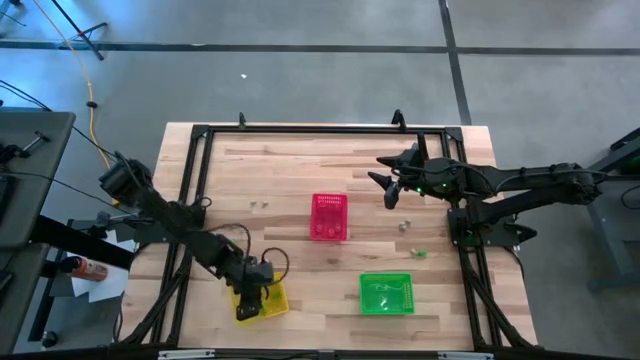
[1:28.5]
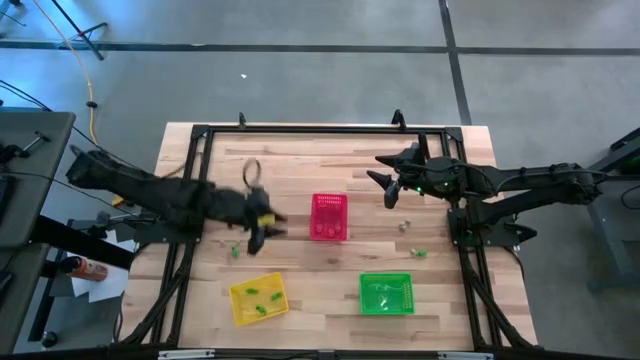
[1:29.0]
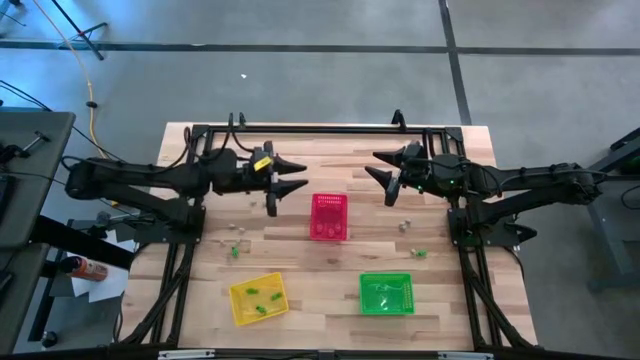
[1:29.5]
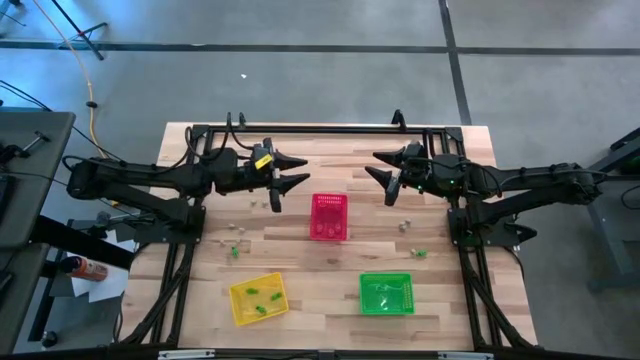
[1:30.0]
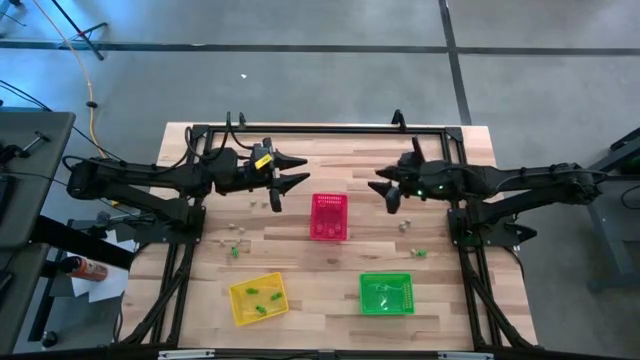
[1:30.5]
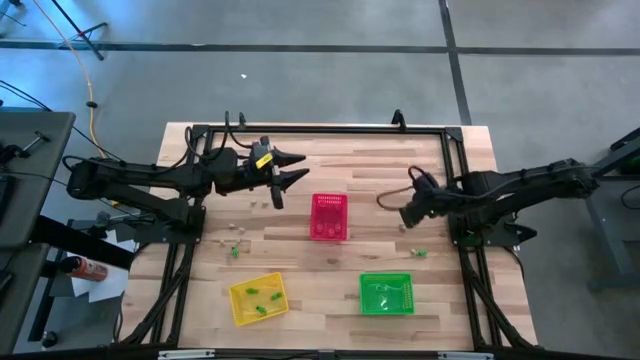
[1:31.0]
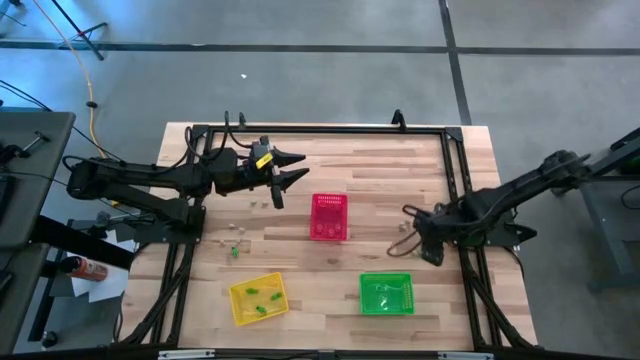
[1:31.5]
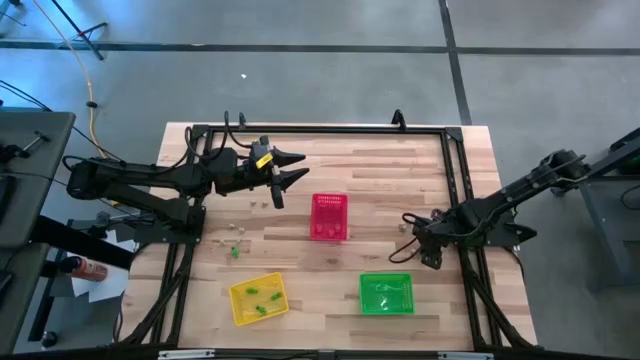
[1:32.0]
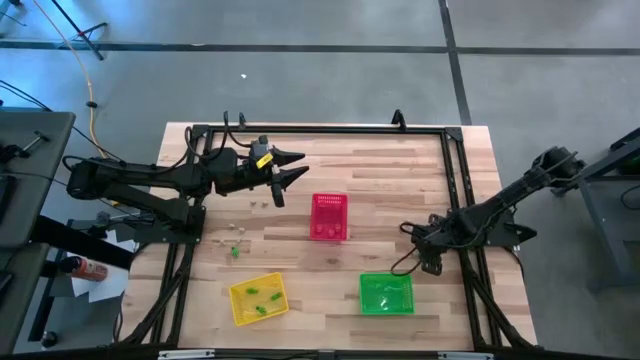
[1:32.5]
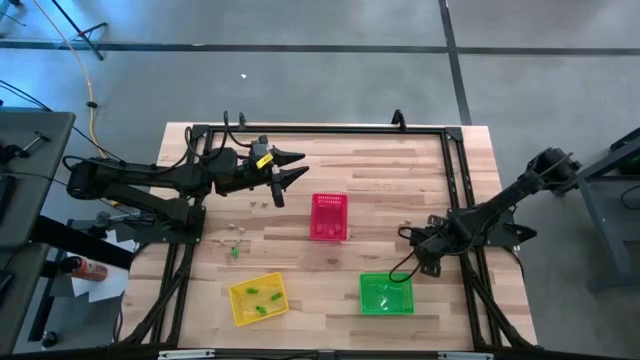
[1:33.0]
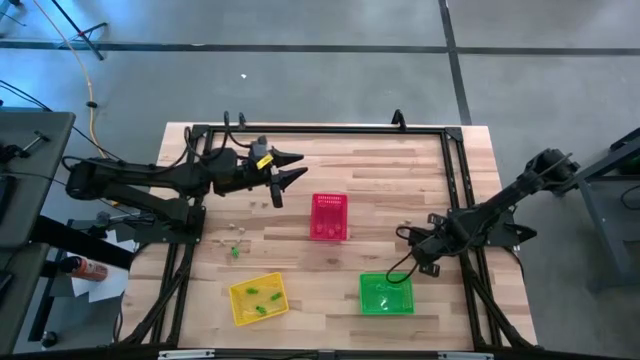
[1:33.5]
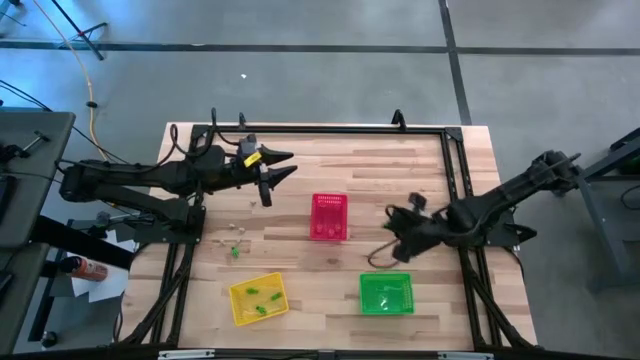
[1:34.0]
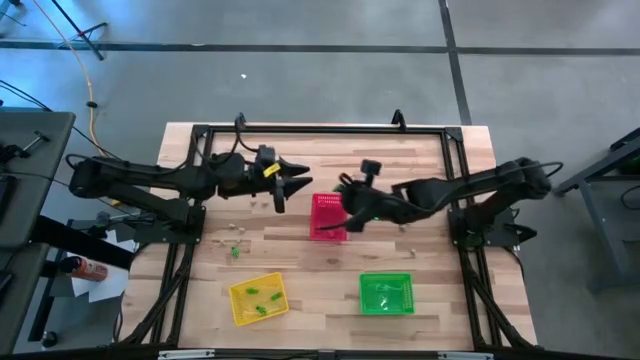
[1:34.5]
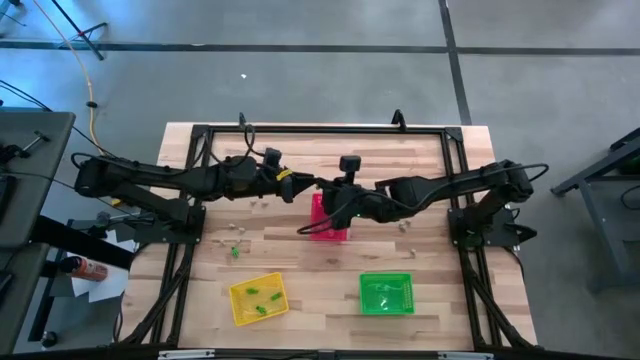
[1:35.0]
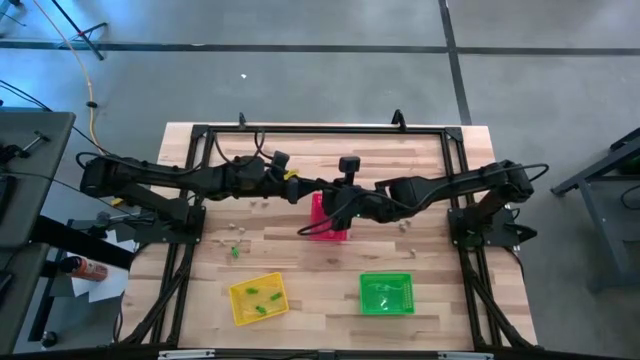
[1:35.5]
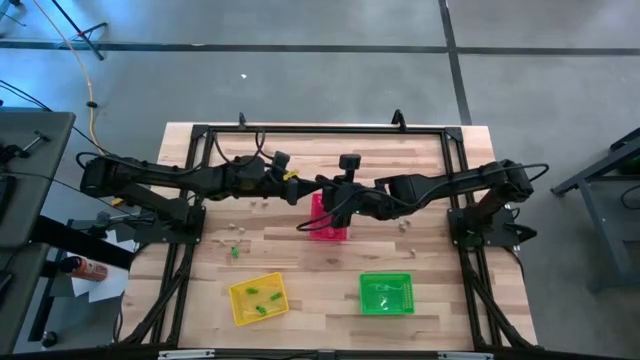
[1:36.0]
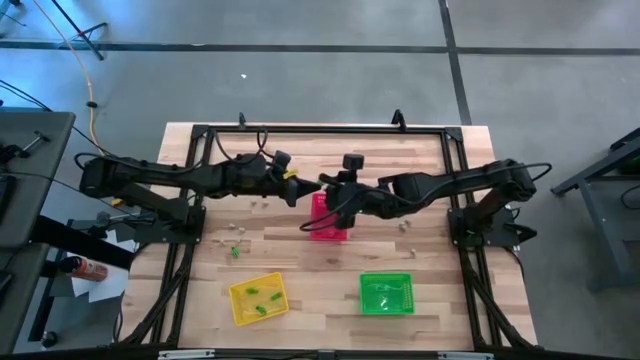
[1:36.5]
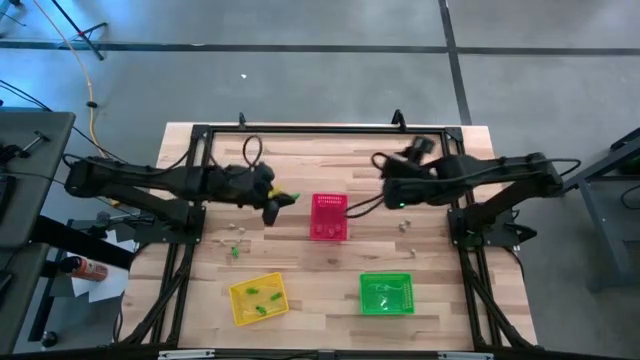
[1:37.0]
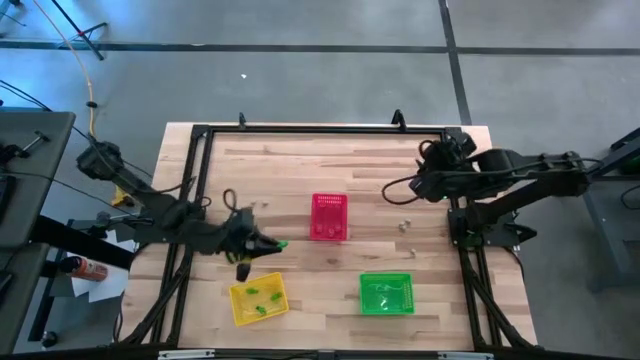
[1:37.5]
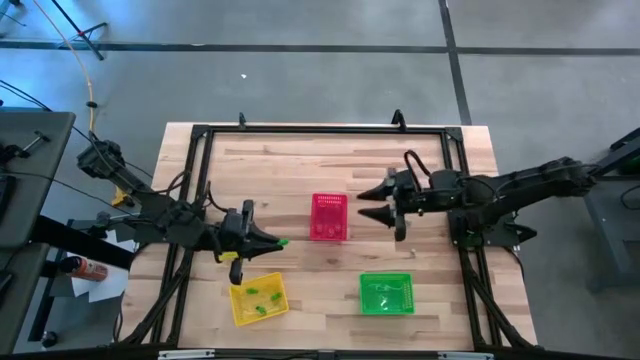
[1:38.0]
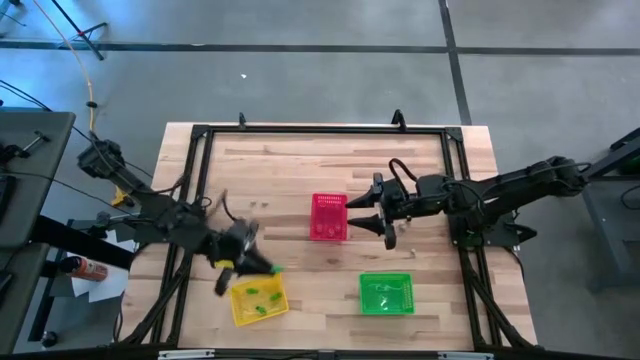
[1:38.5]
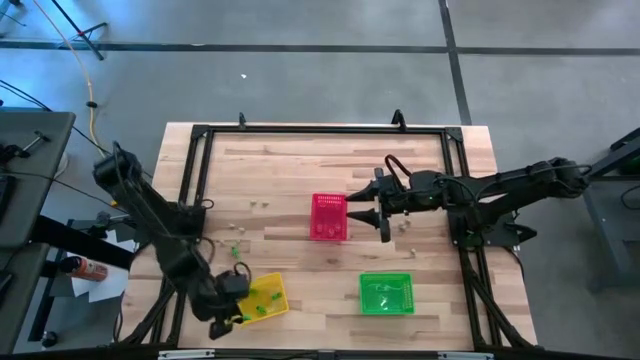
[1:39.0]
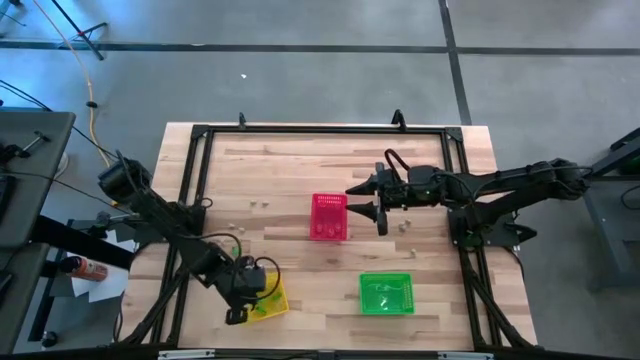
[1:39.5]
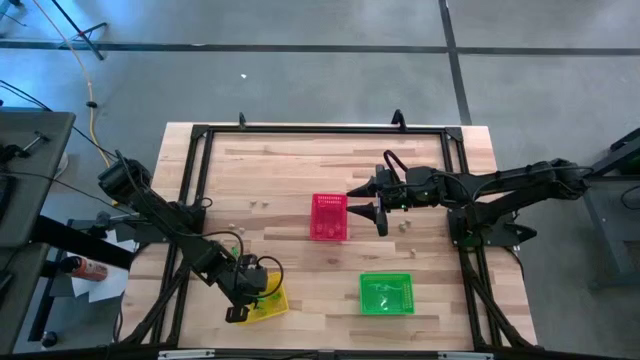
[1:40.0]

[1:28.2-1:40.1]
Task: Sort Halloween decoration
Put the right green skeleton toy into the yellow bin

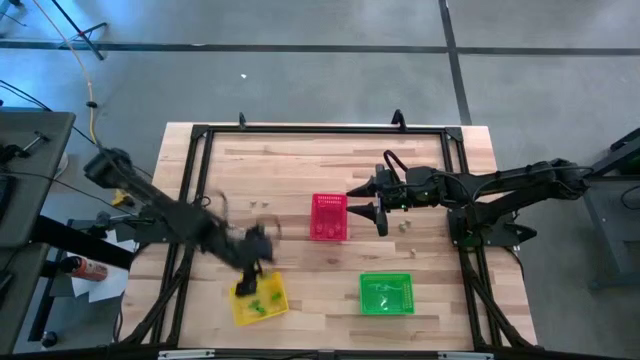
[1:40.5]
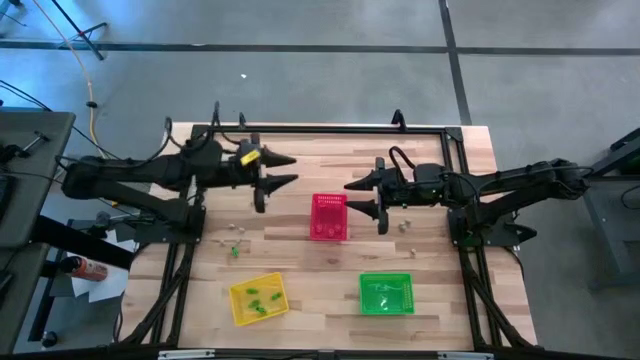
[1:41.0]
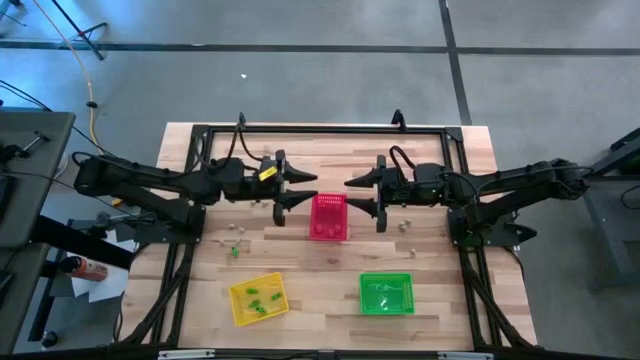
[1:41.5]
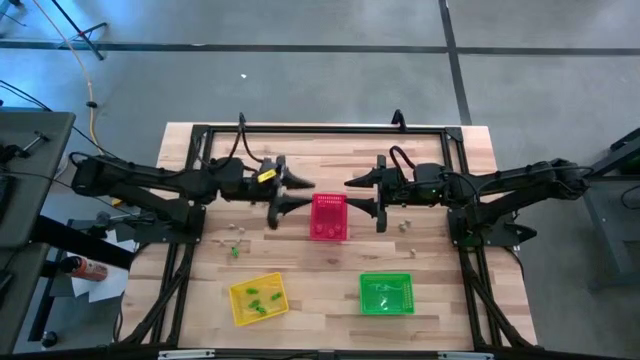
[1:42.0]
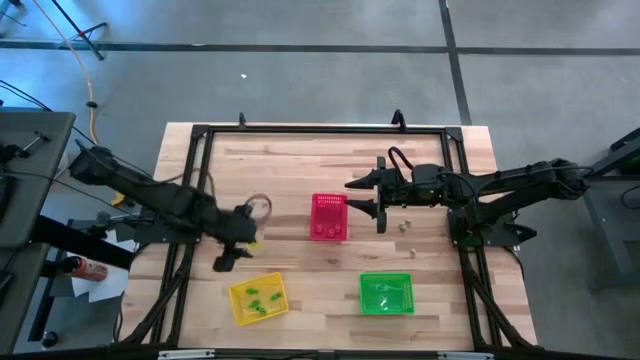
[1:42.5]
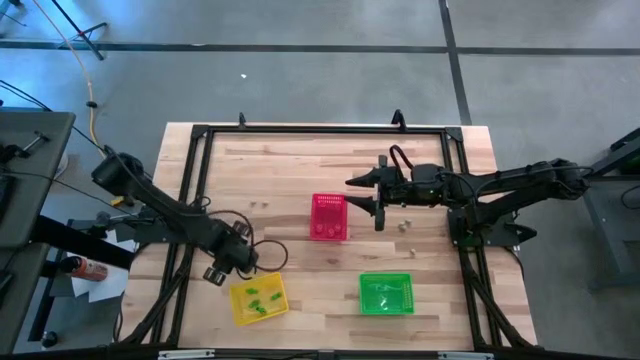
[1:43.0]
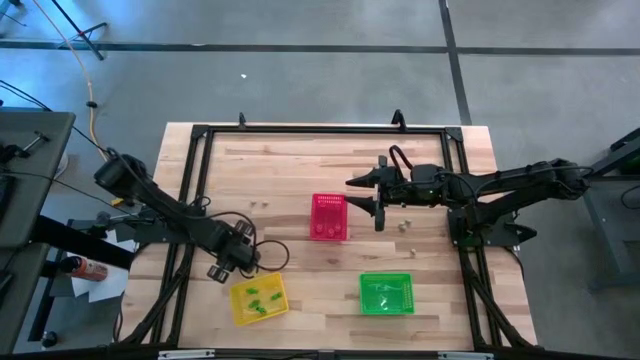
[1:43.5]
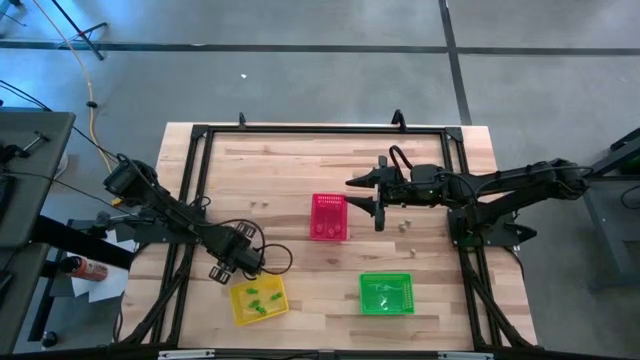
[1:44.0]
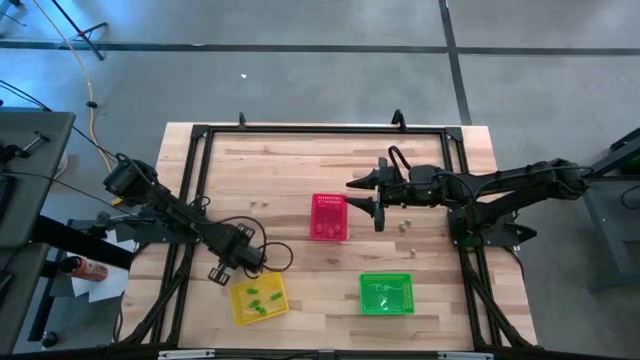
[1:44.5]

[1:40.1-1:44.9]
Put the green skeleton toy into the yellow bin

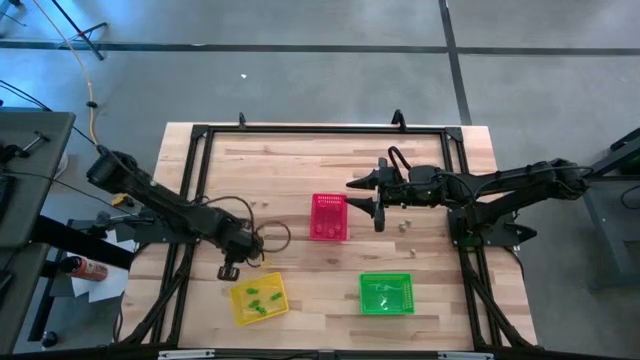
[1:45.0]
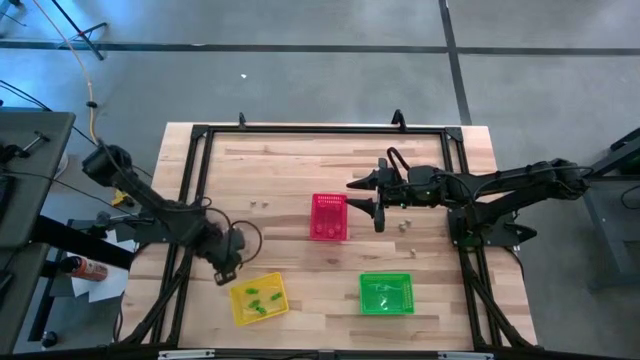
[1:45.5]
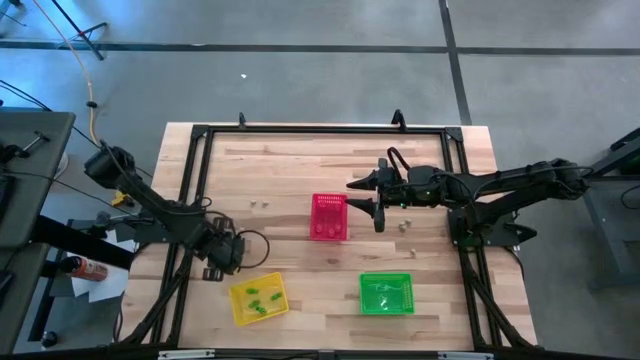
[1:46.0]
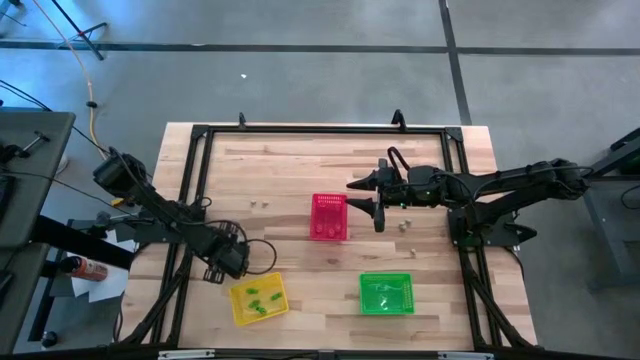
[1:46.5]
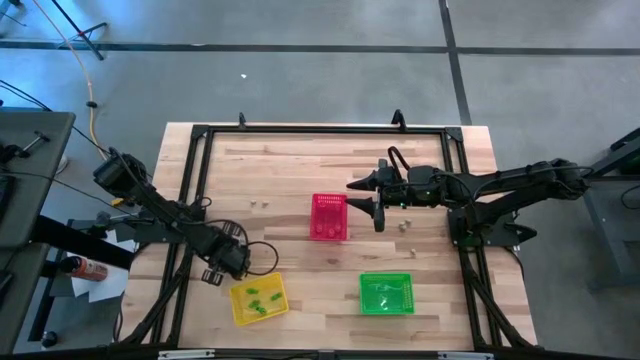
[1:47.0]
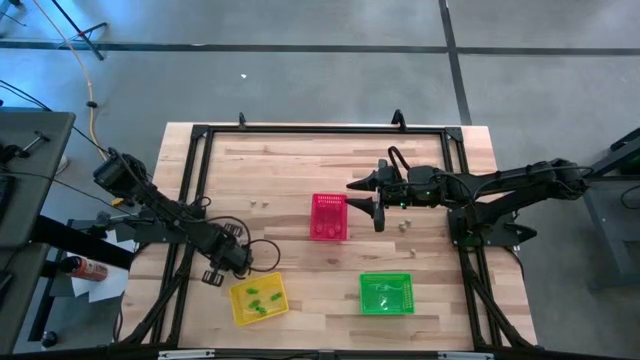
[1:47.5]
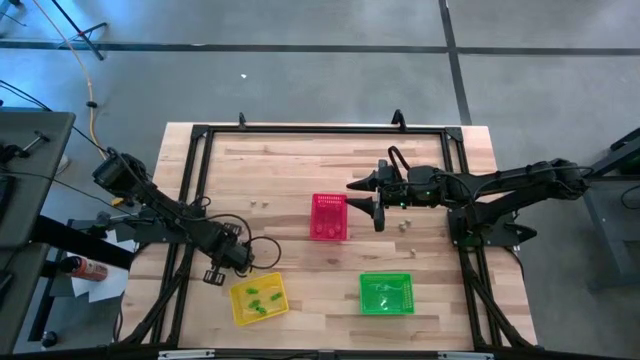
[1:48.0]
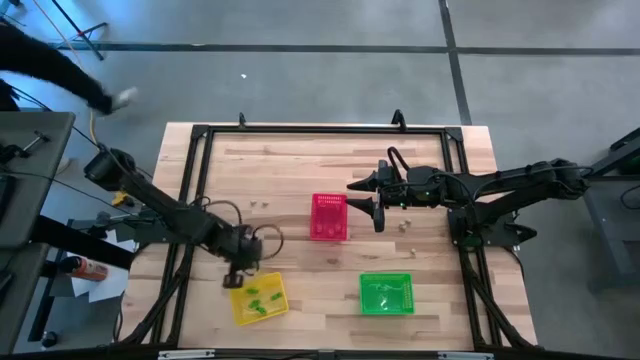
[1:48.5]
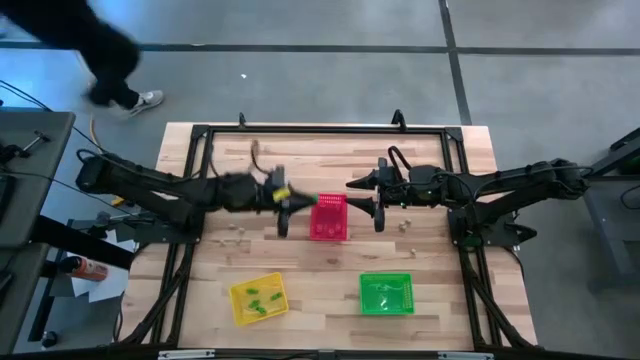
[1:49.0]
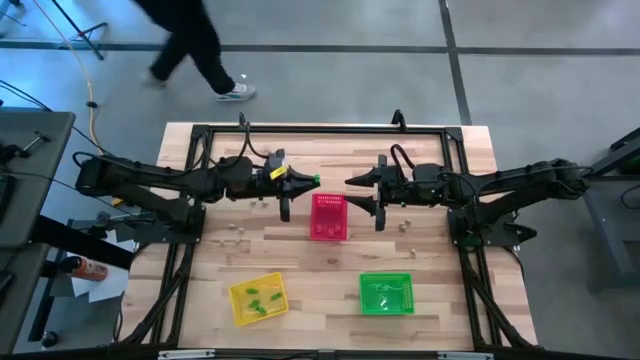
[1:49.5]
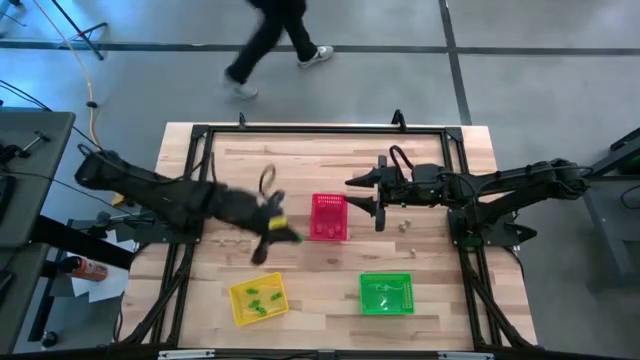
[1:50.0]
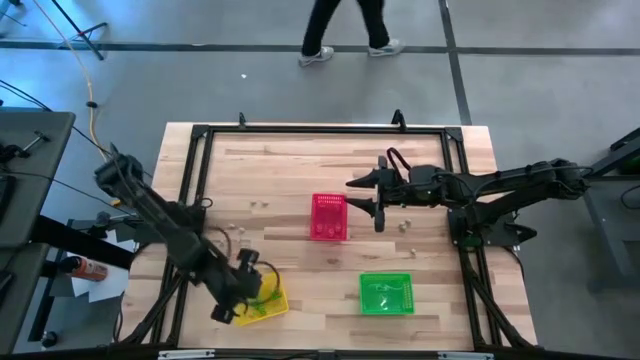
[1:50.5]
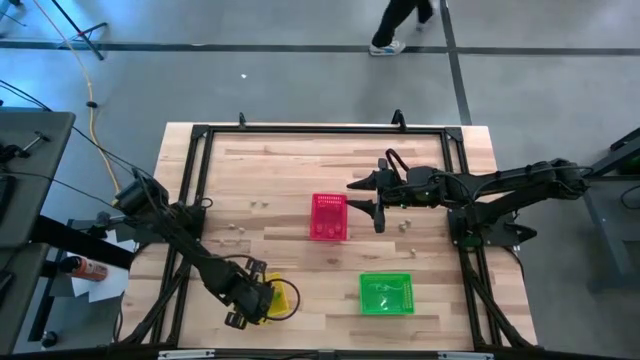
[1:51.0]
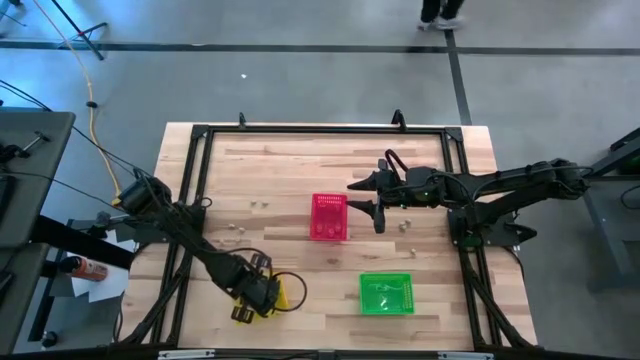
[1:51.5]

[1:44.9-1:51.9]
Put the green skeleton toy into the yellow bin
